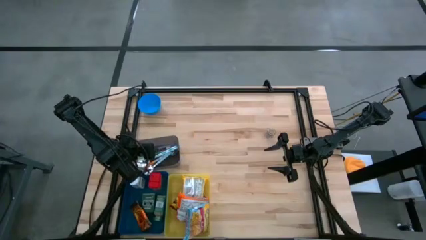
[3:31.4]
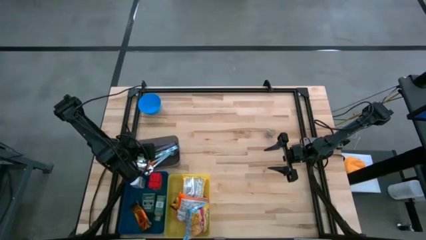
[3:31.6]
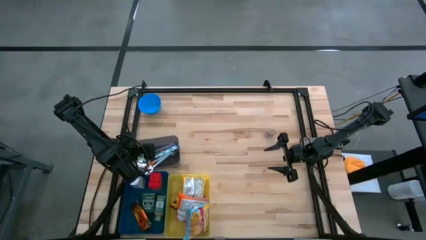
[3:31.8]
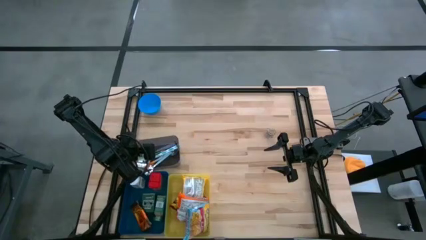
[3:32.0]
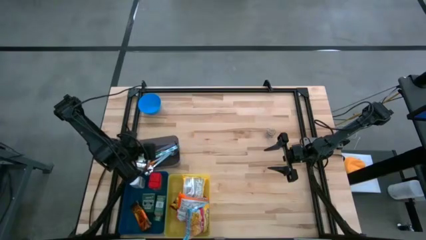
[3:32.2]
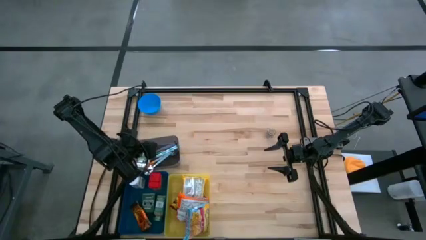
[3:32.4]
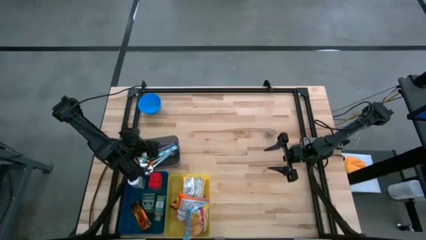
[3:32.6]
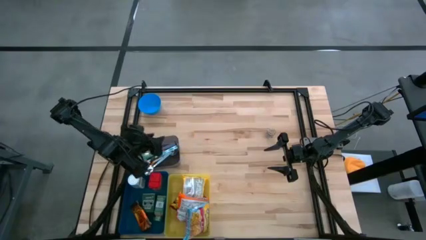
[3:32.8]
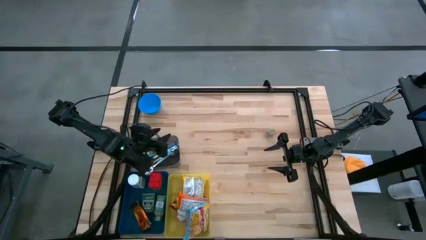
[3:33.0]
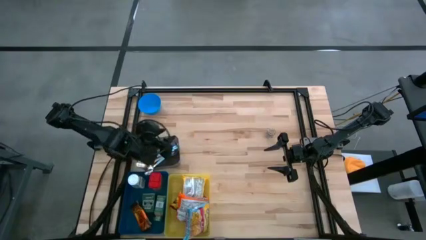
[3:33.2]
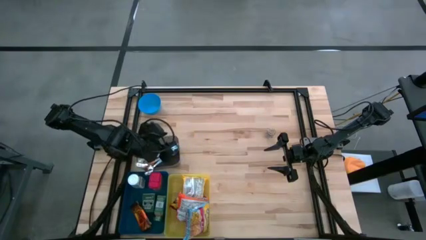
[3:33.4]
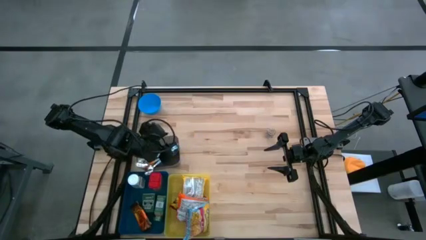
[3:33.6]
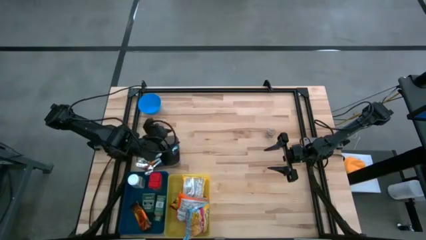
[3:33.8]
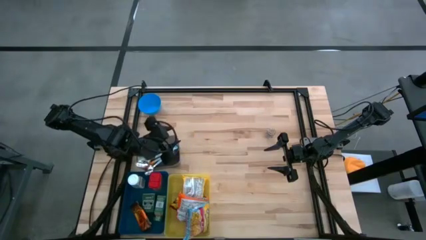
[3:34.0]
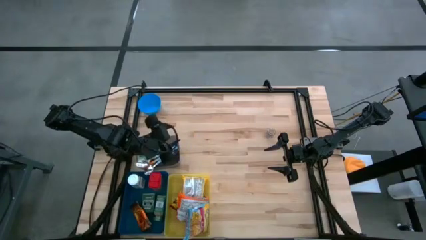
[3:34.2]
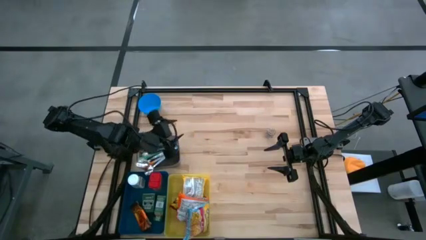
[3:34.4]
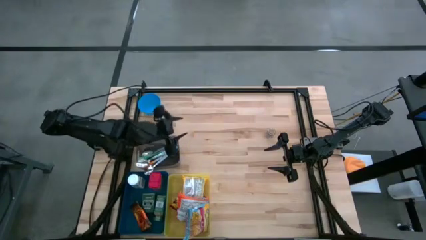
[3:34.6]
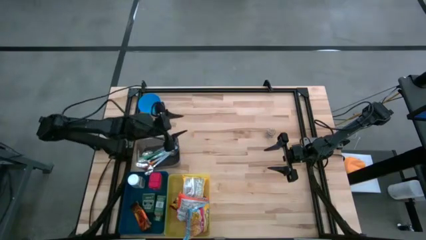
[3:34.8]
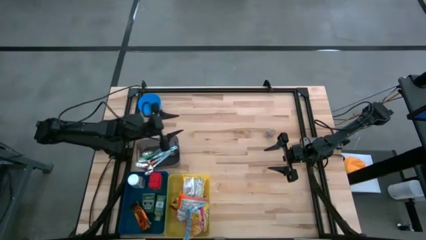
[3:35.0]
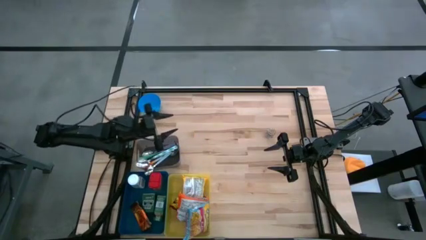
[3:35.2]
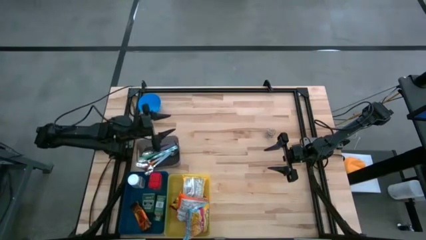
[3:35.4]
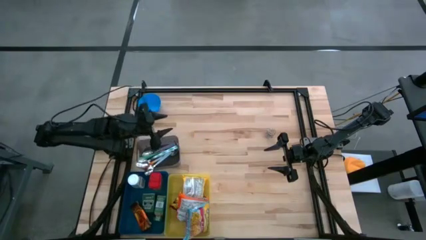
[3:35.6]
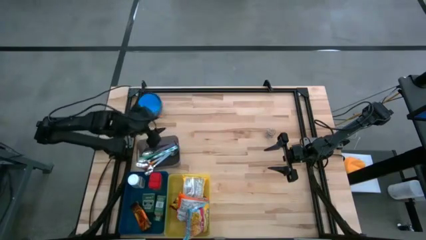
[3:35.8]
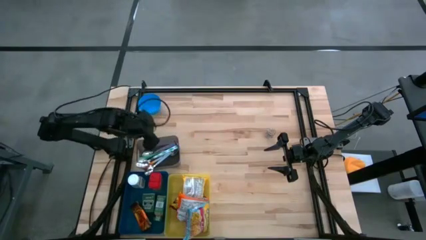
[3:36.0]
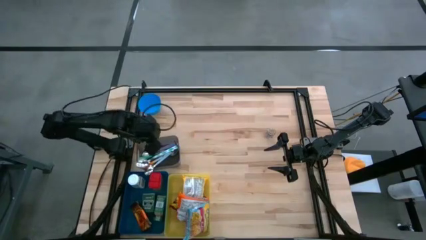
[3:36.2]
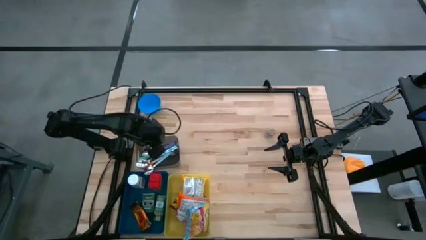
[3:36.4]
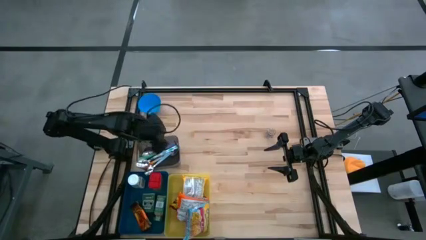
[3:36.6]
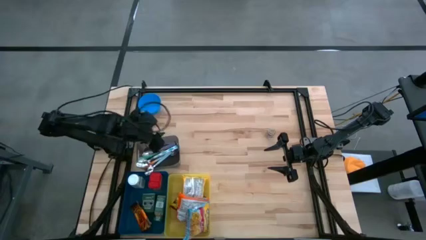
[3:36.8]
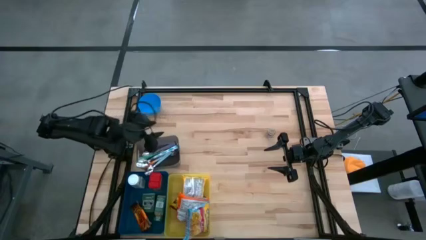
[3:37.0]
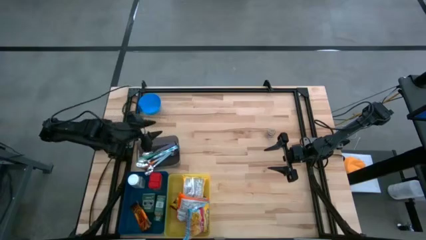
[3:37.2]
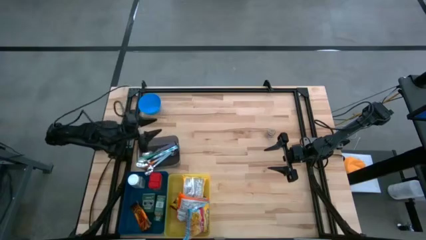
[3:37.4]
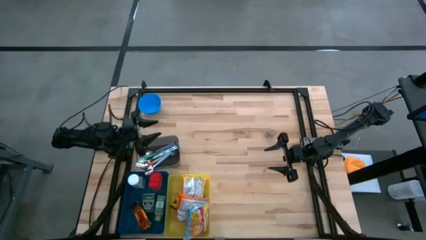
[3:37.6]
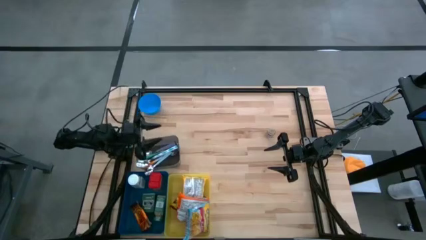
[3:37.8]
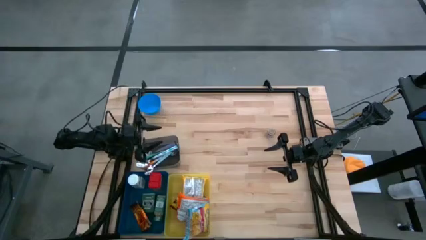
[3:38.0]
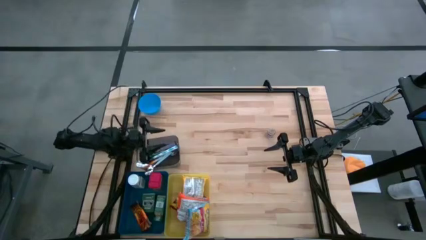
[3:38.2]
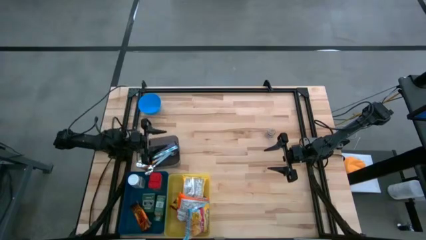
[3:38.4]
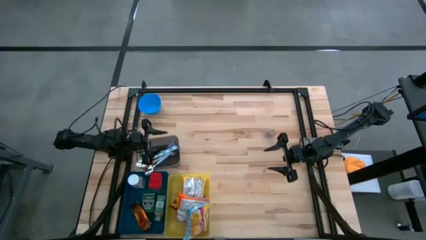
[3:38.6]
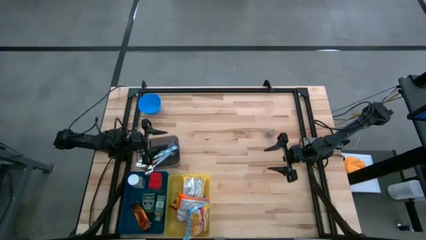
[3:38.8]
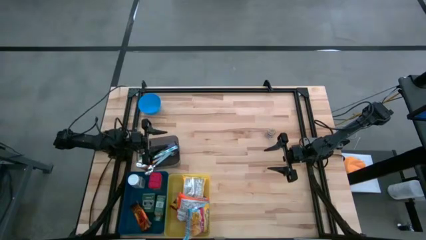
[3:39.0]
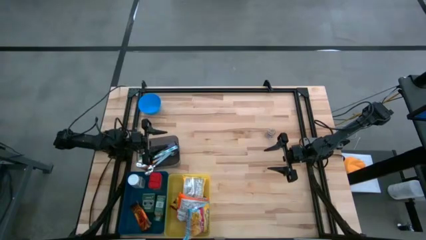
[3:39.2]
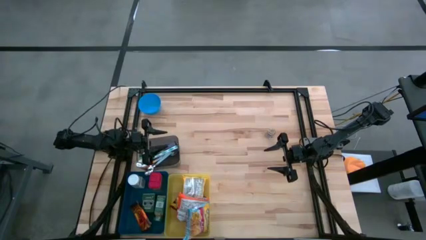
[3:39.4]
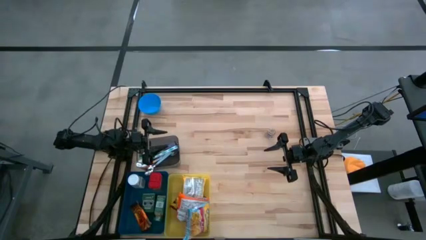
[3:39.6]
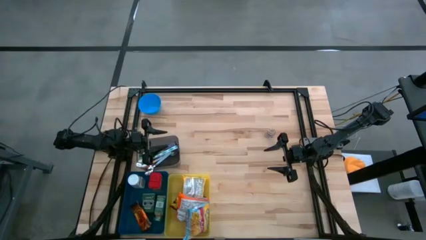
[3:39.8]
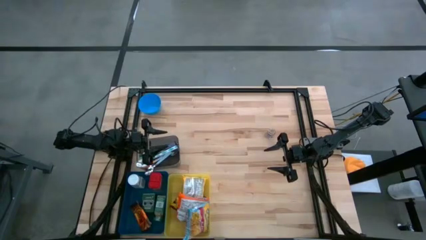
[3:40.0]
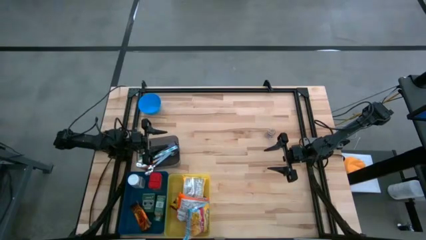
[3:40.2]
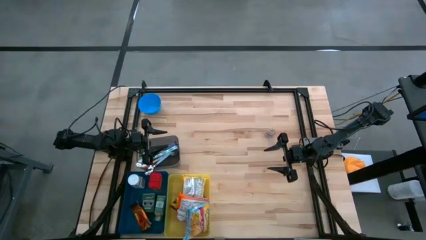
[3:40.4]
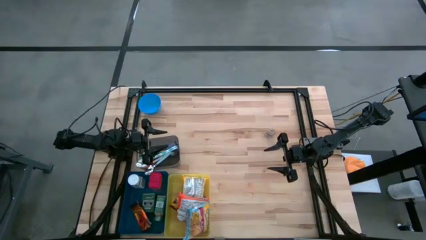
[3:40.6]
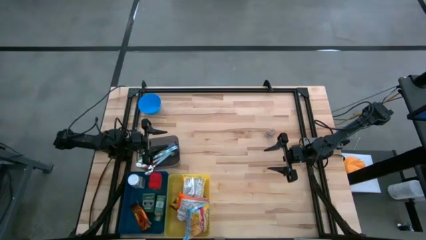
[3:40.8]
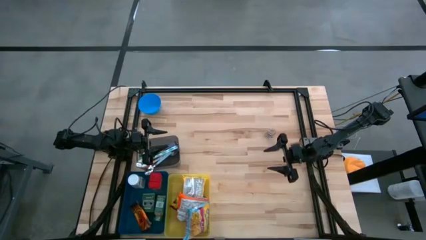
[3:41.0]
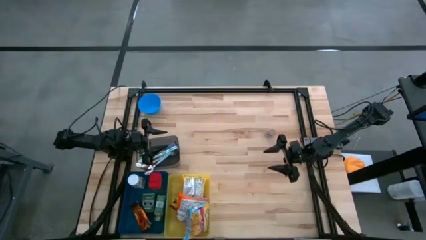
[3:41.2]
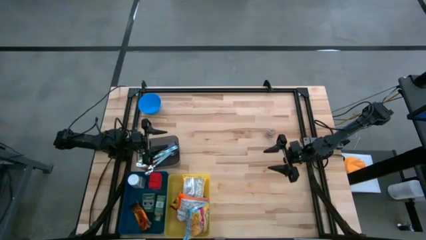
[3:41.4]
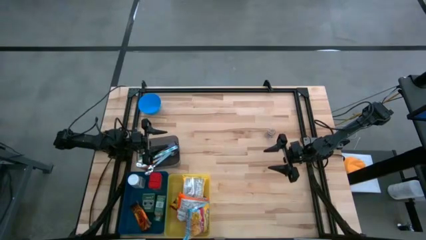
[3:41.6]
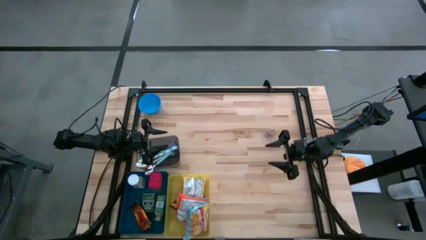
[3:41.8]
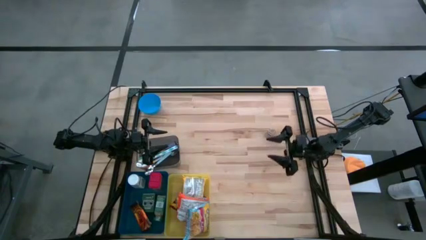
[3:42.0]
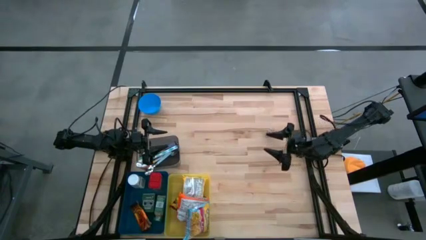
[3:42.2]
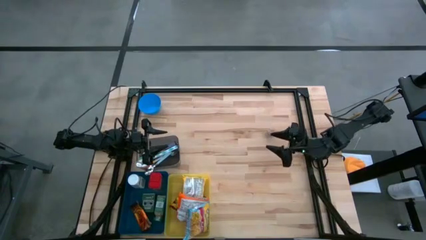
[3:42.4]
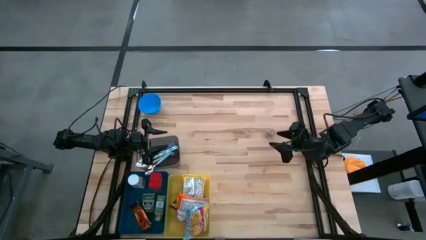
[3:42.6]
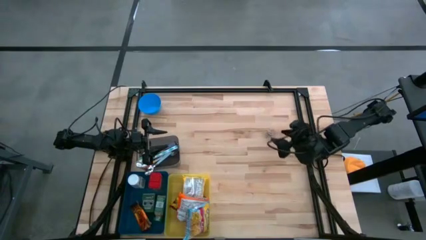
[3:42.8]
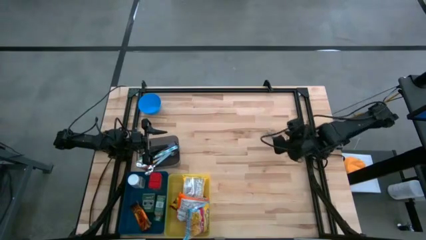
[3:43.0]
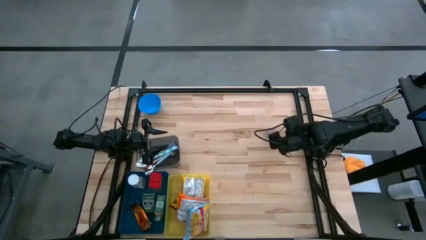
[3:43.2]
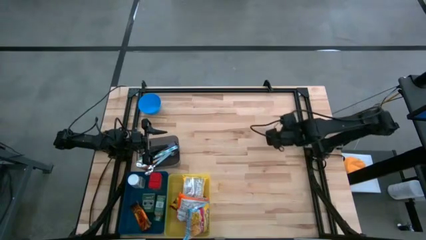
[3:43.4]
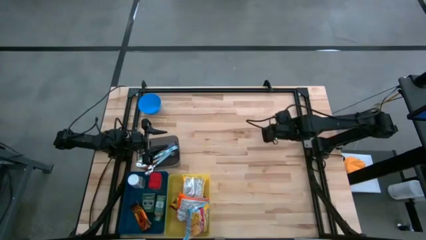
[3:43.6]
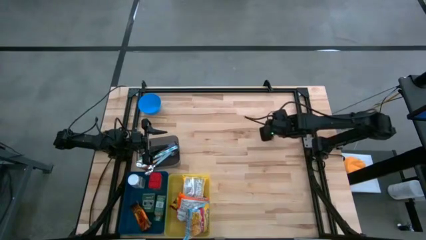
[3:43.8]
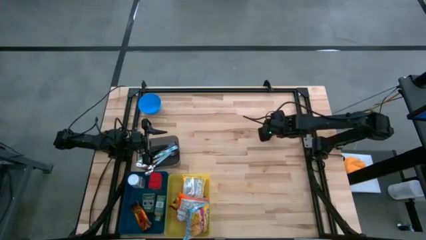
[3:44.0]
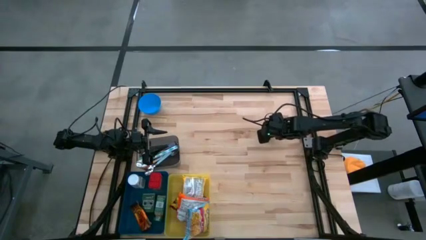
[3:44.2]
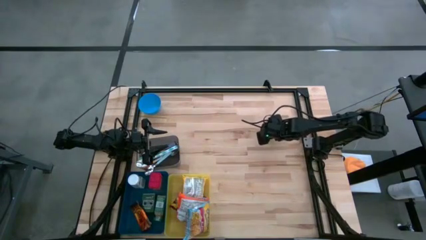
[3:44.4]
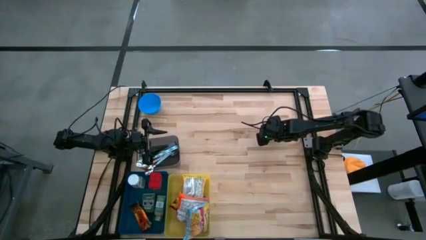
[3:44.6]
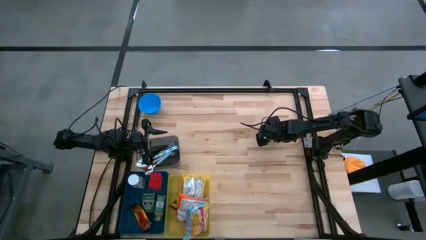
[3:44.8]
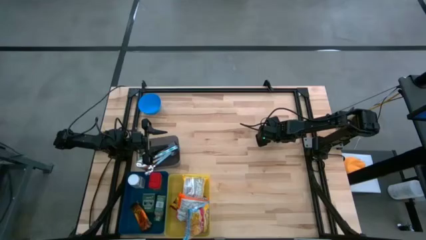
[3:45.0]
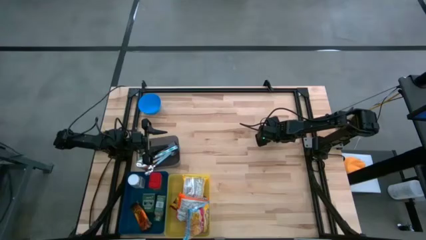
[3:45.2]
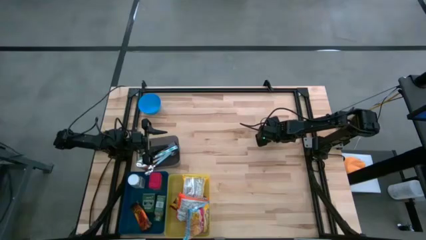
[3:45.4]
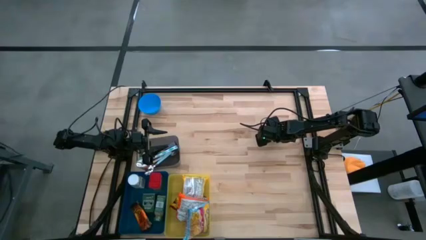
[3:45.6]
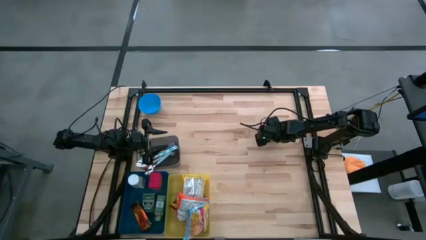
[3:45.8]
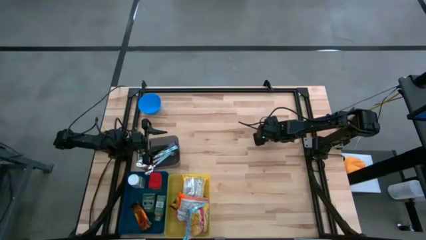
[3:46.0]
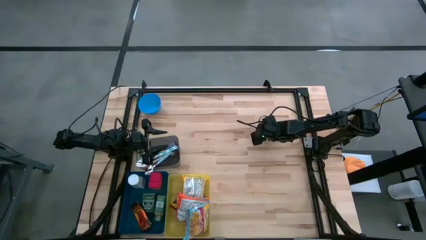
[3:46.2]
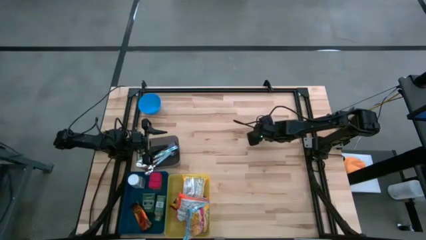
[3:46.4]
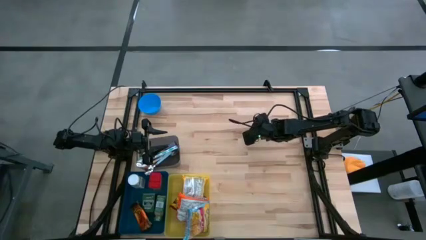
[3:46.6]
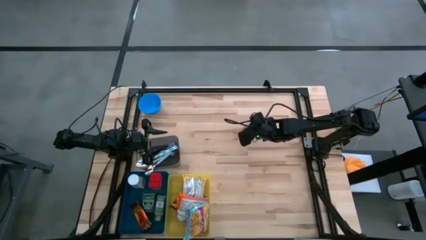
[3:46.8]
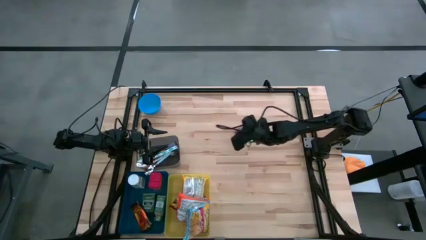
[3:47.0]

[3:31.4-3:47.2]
Put the brown seasoning bottle into the blue bin
